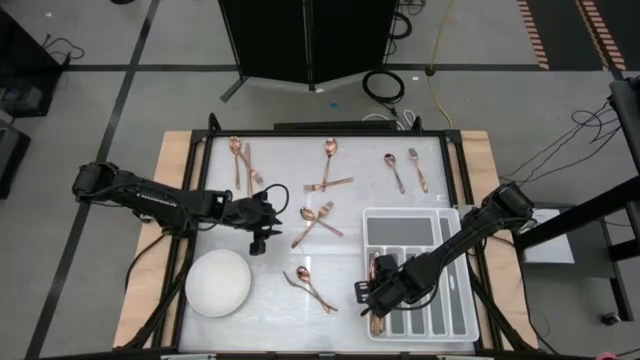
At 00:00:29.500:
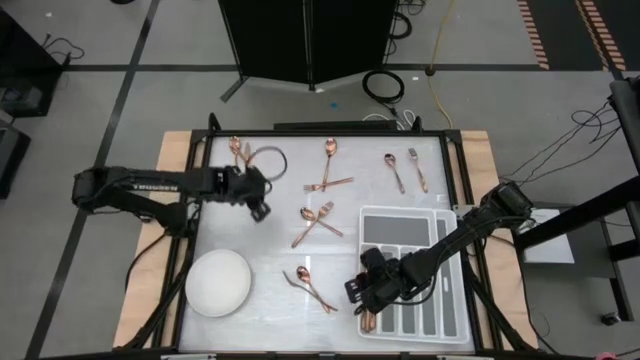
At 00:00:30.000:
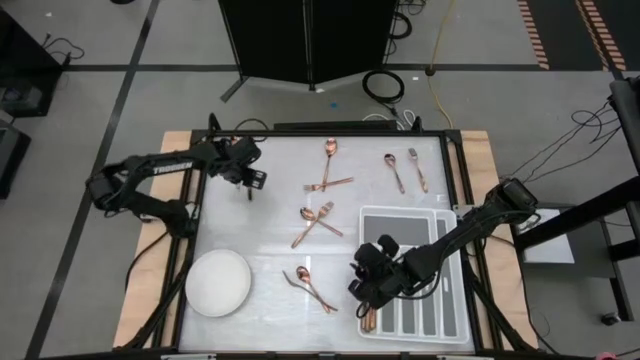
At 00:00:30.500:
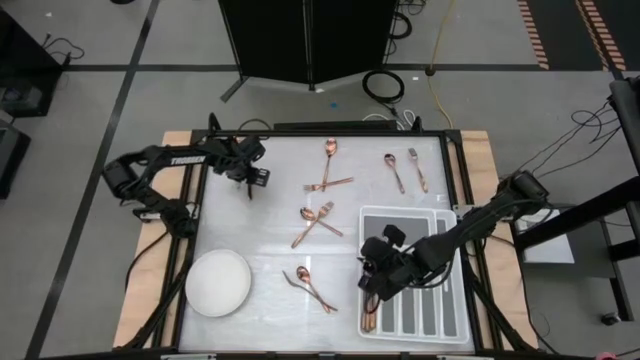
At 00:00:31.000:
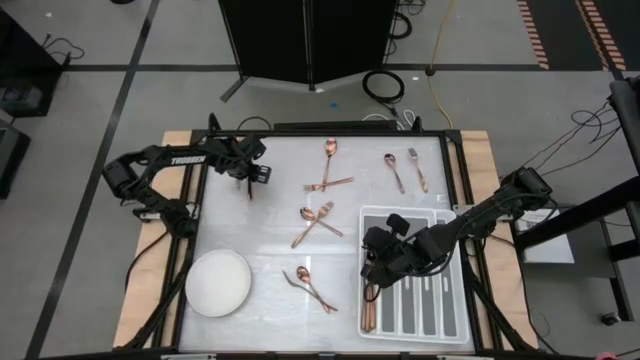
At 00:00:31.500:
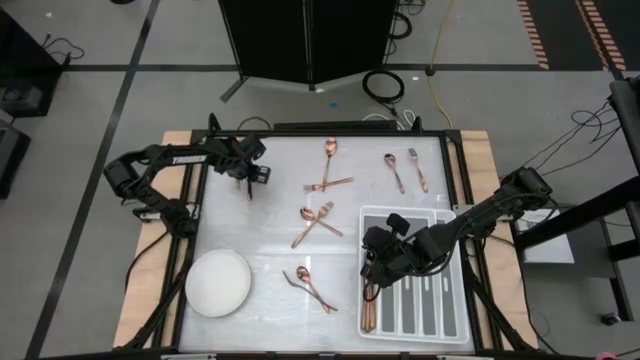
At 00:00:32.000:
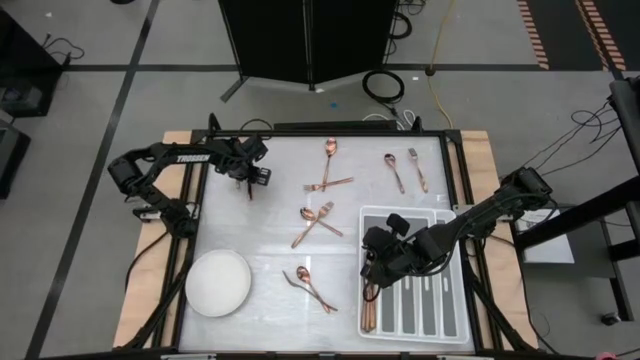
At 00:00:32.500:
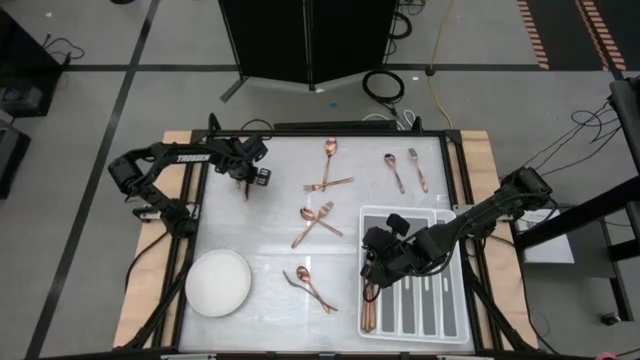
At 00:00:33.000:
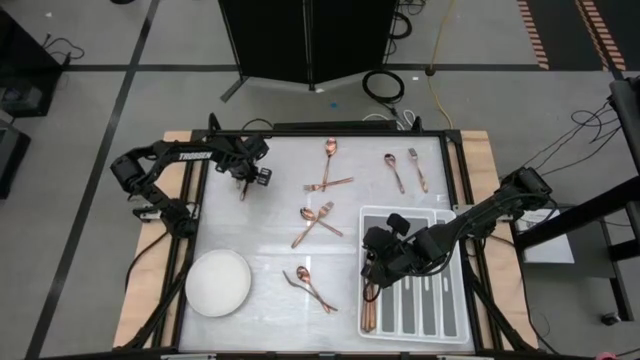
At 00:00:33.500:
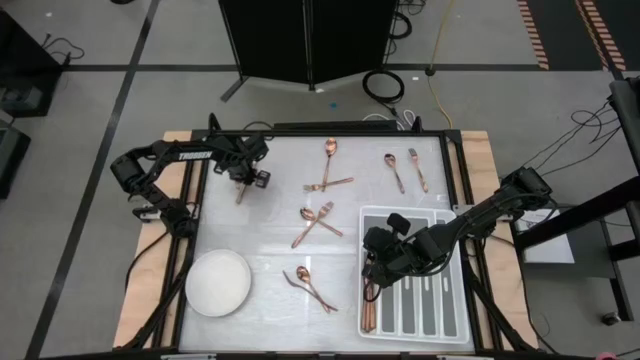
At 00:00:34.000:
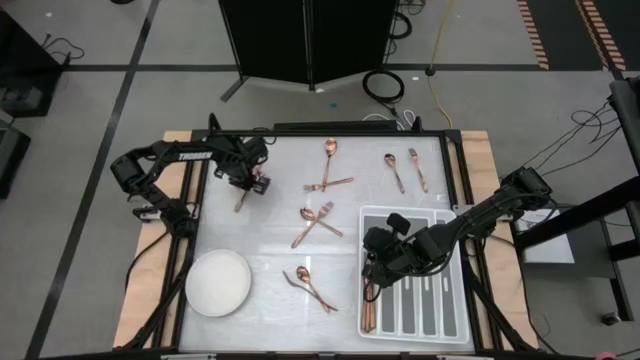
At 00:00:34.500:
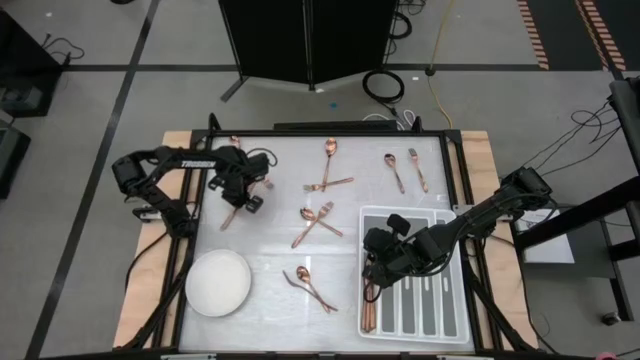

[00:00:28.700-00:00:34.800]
Task: Sort silverware
Put the brown knife in the white silverware organizer

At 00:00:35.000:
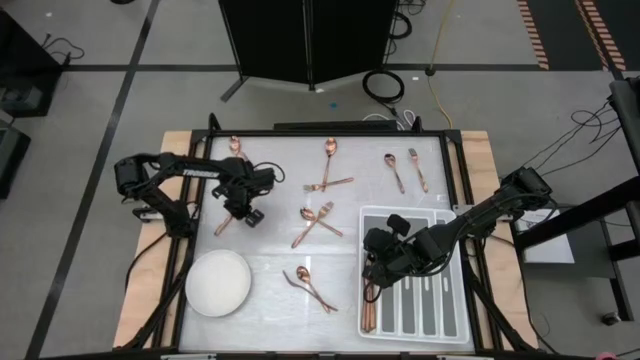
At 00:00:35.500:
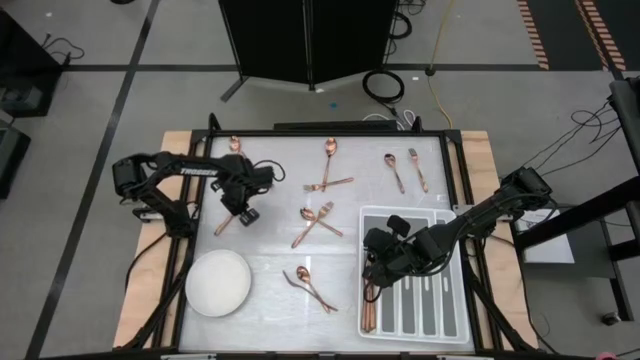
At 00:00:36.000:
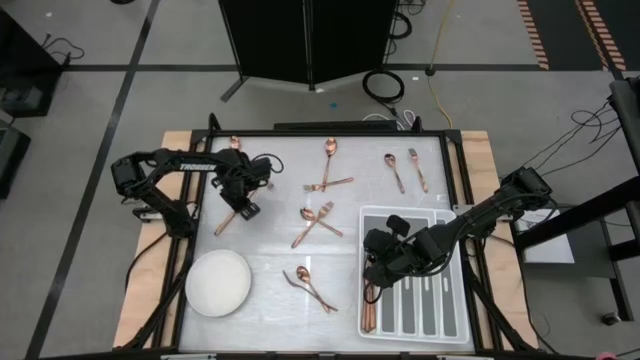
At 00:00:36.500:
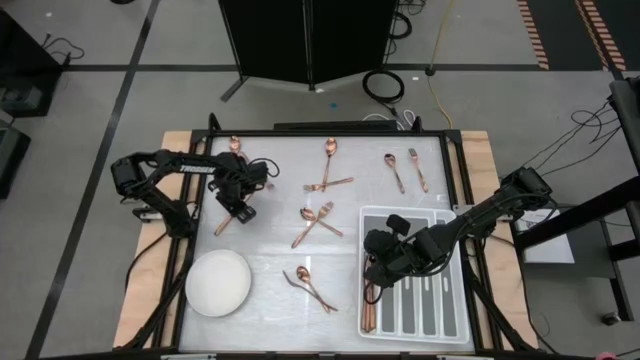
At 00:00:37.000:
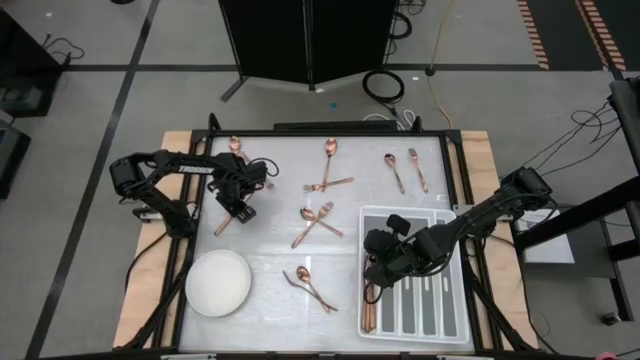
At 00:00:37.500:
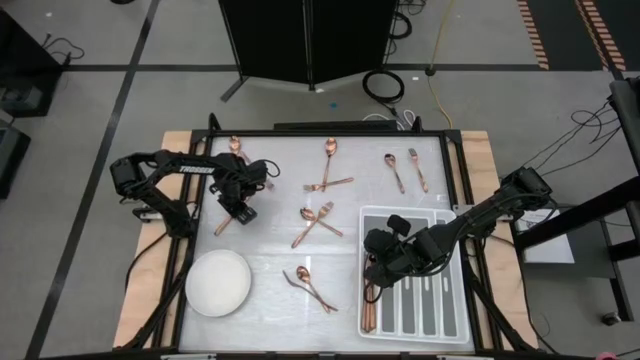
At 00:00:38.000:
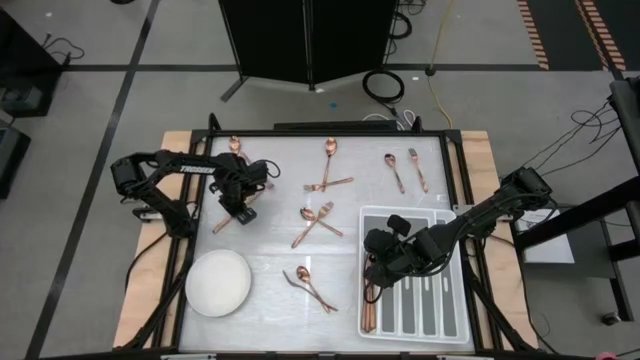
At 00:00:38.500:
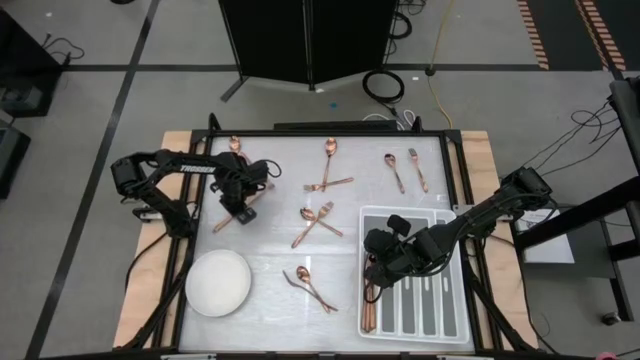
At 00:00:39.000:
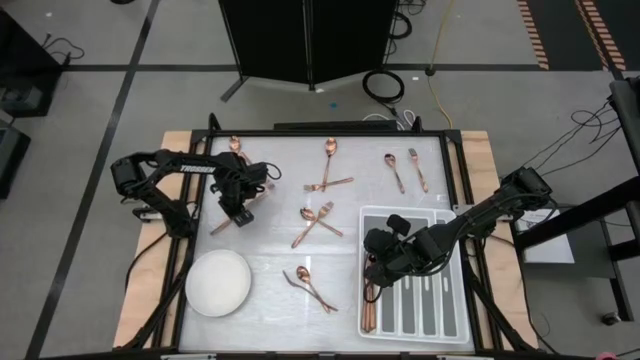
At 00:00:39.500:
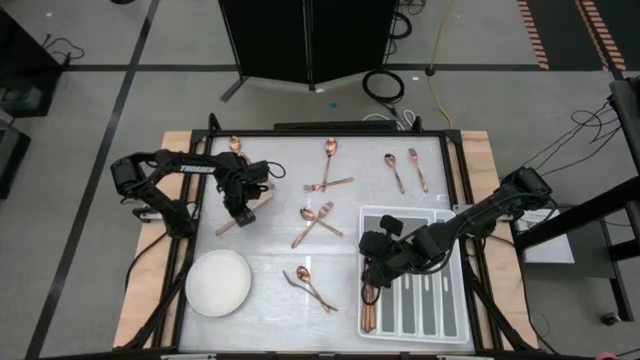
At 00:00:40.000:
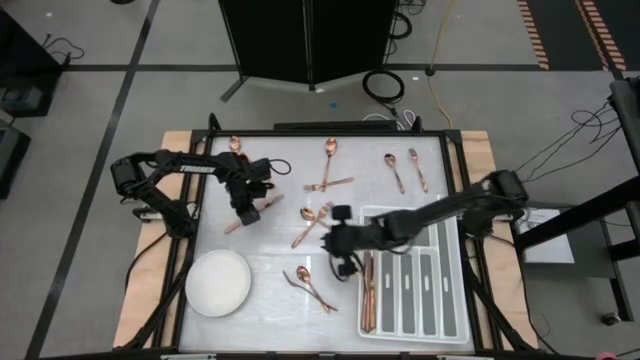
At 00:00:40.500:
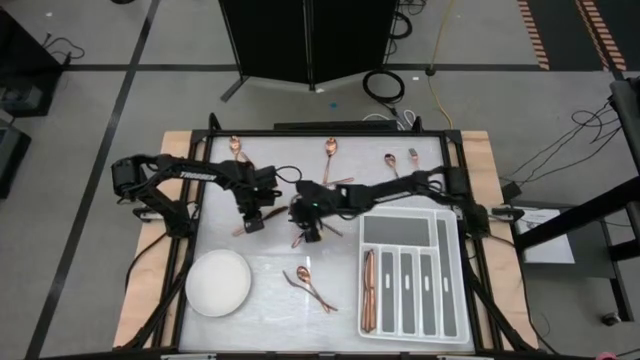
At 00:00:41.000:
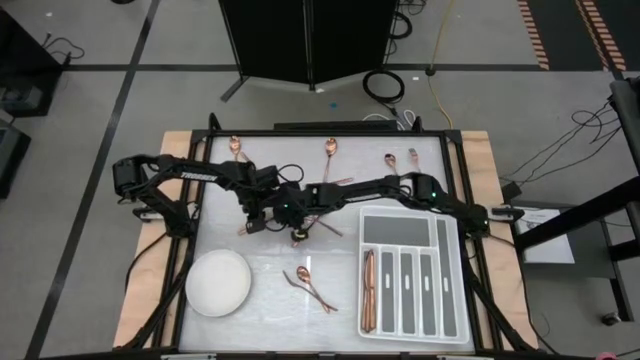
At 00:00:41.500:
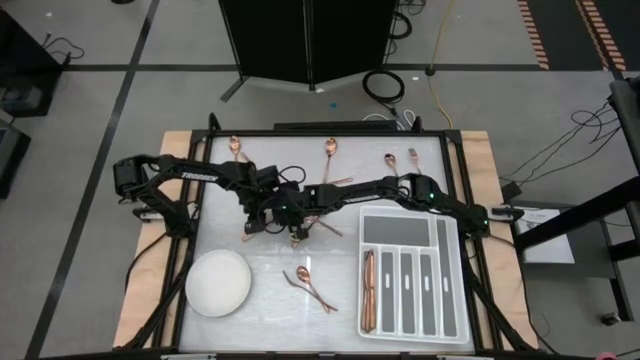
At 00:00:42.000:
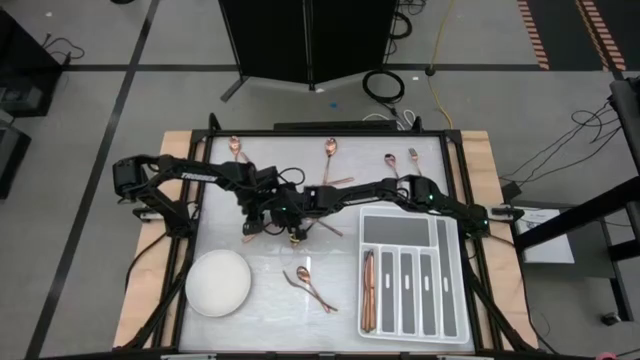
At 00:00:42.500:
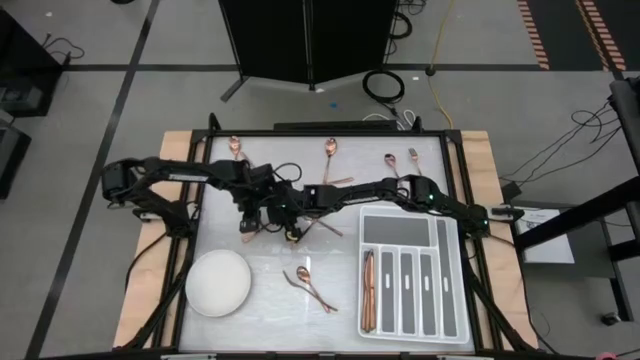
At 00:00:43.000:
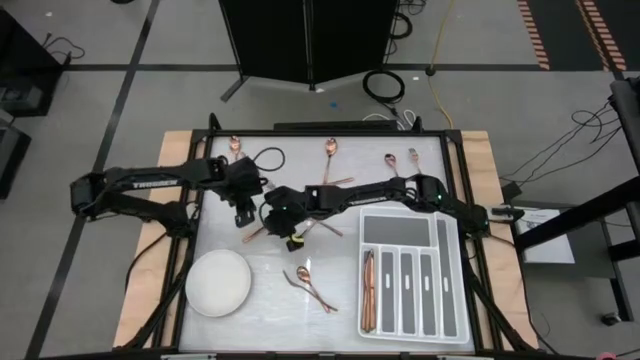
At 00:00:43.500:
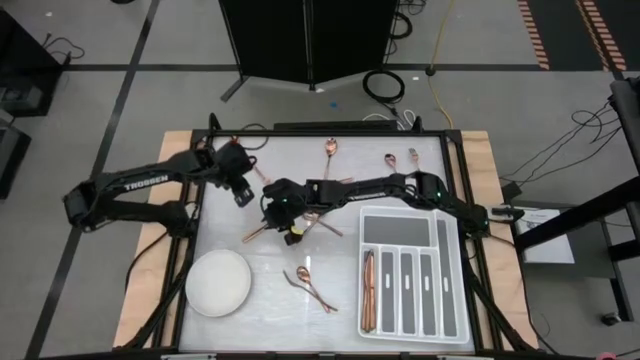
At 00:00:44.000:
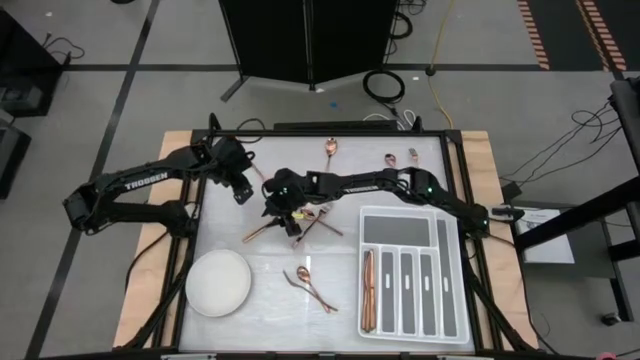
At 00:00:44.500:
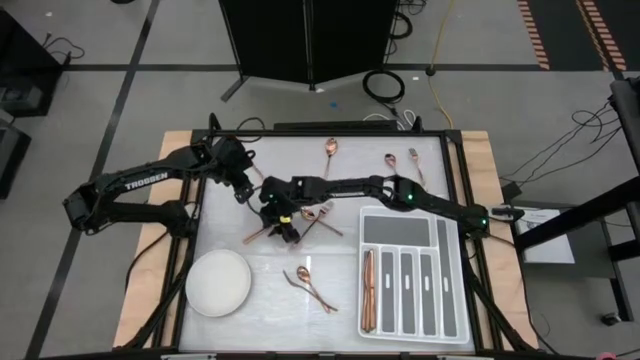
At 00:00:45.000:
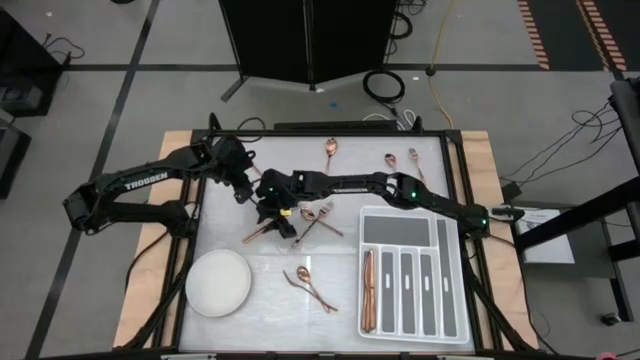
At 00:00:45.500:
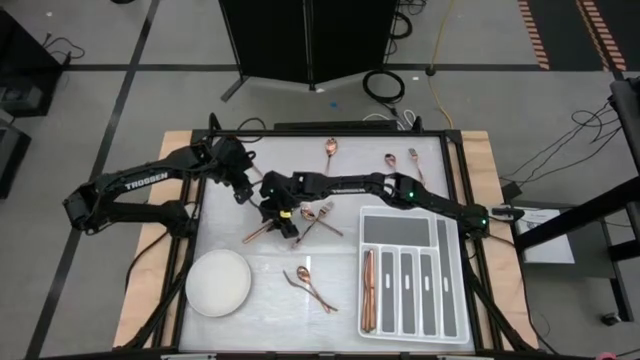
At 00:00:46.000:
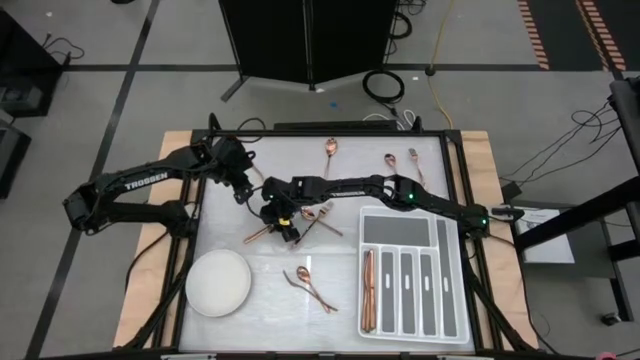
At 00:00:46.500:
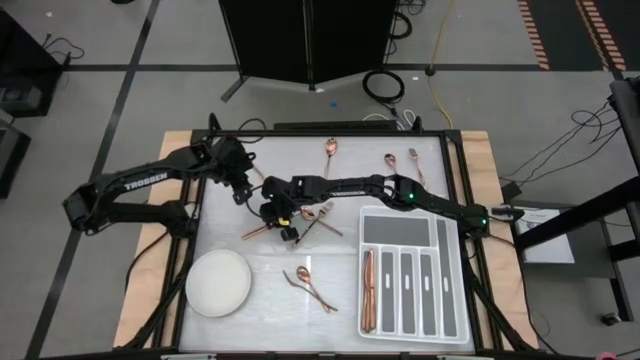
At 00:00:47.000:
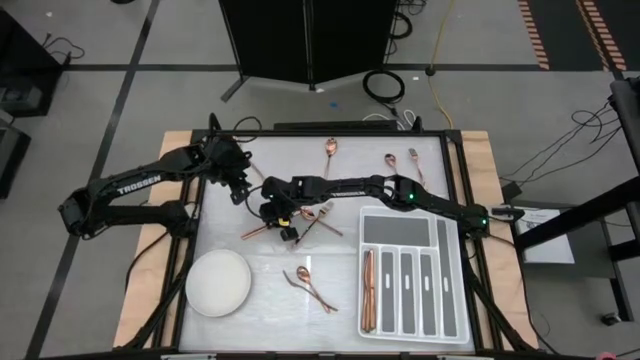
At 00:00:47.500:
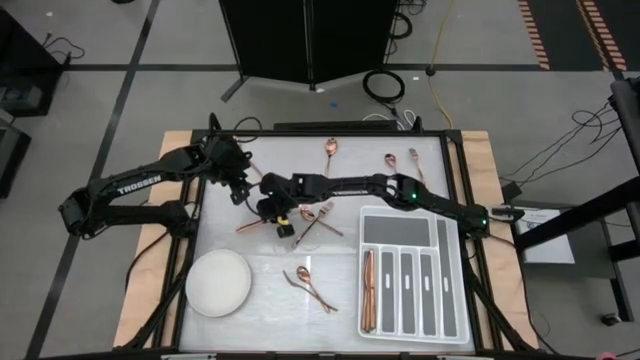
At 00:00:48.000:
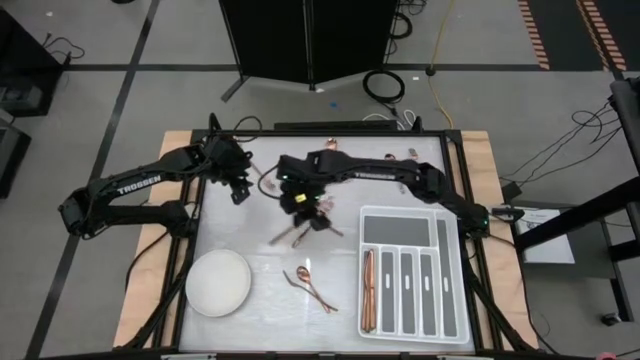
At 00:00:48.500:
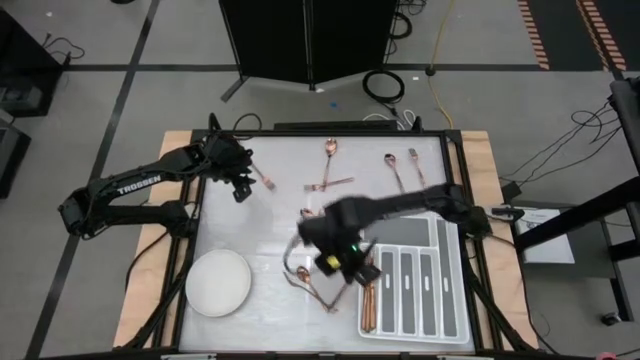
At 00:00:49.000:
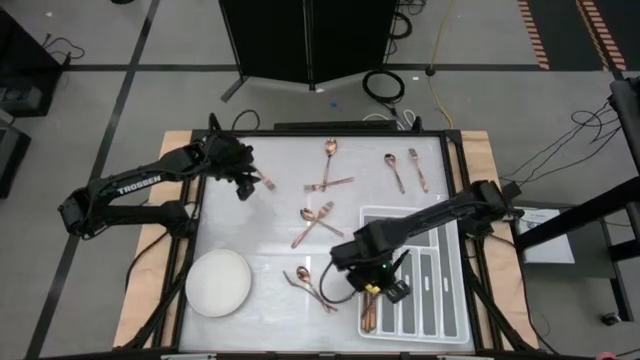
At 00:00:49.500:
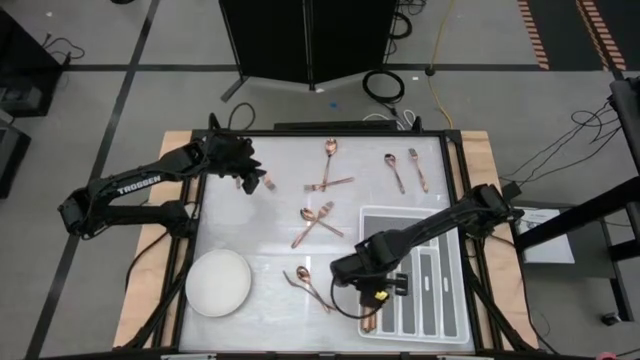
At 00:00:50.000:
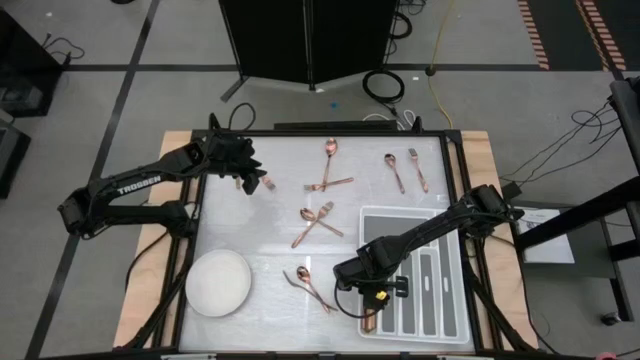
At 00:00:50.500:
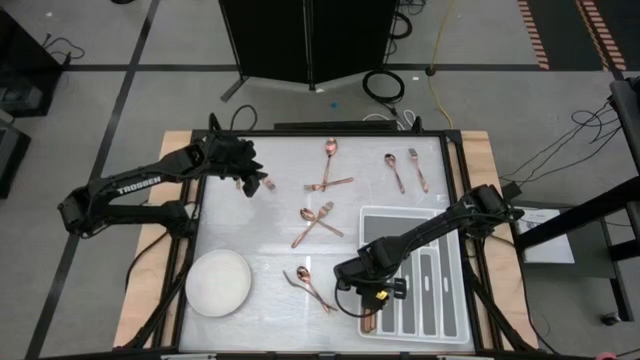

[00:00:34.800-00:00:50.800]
Put the brown knife in the white silverware organizer
